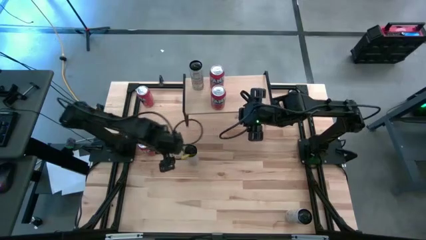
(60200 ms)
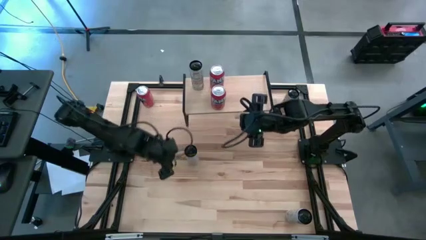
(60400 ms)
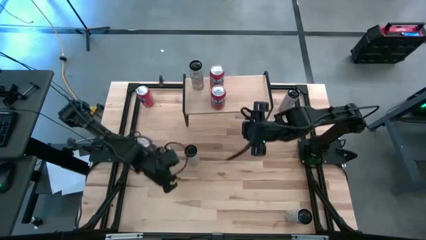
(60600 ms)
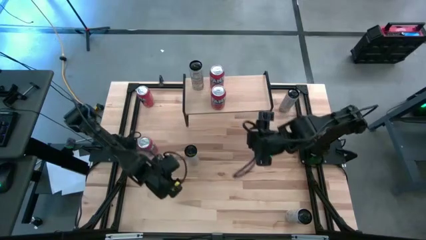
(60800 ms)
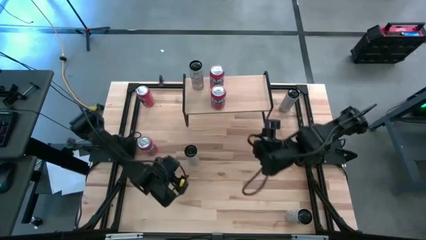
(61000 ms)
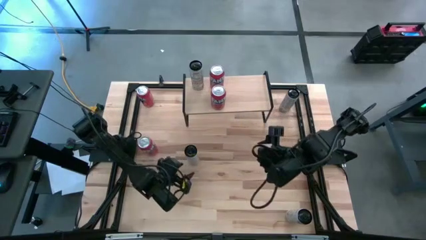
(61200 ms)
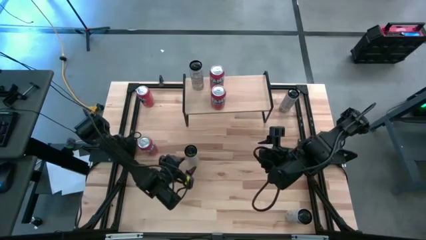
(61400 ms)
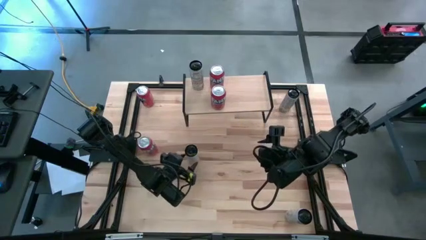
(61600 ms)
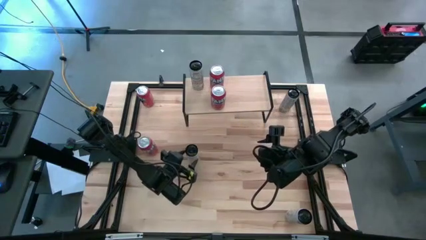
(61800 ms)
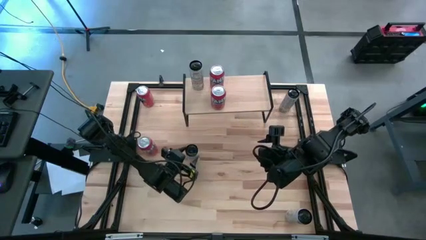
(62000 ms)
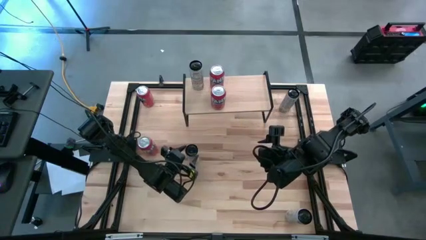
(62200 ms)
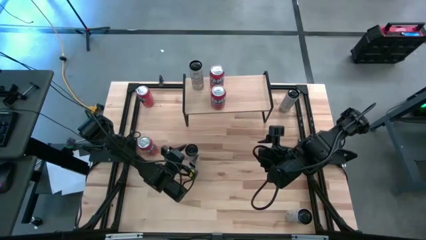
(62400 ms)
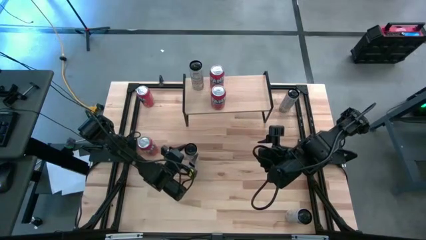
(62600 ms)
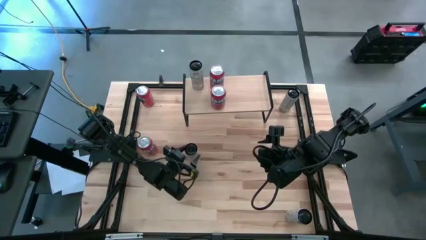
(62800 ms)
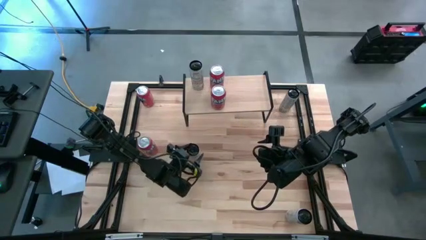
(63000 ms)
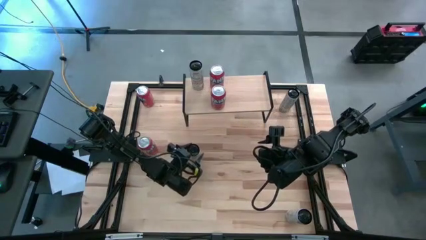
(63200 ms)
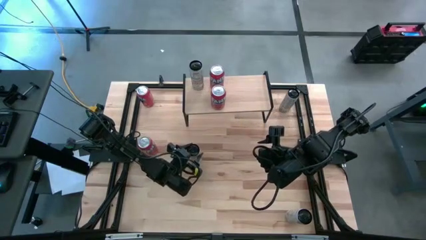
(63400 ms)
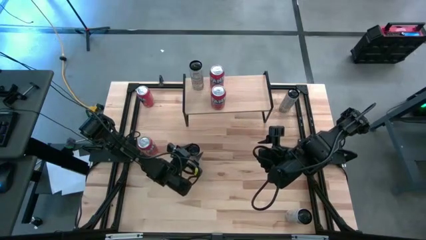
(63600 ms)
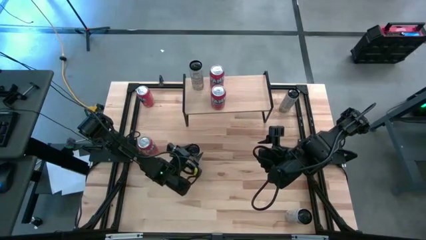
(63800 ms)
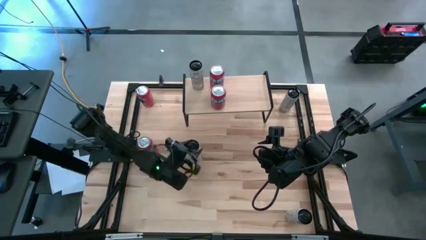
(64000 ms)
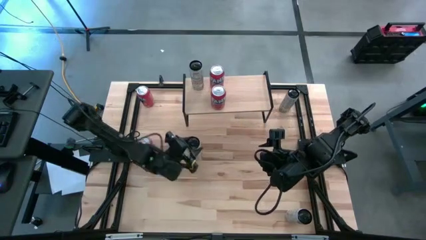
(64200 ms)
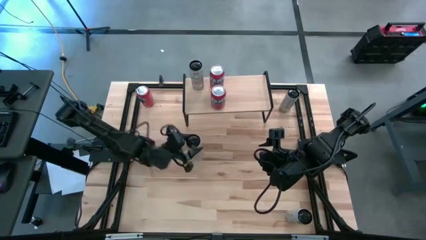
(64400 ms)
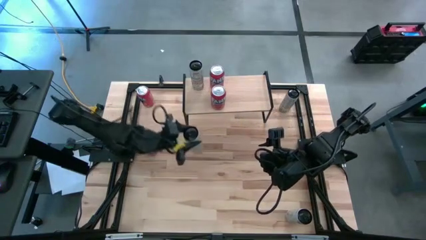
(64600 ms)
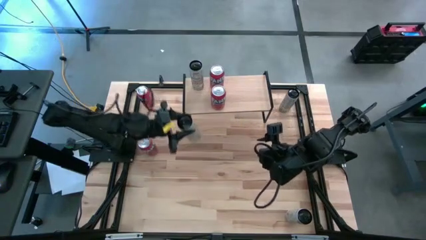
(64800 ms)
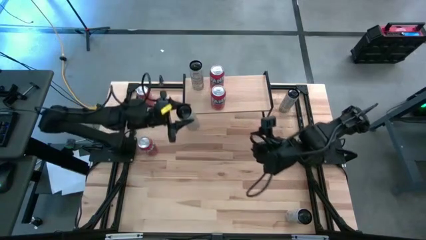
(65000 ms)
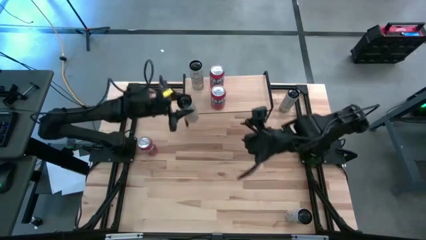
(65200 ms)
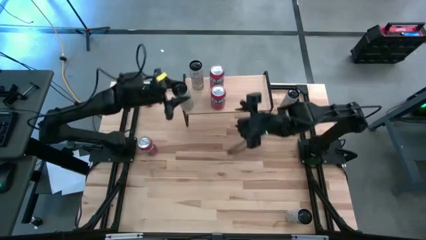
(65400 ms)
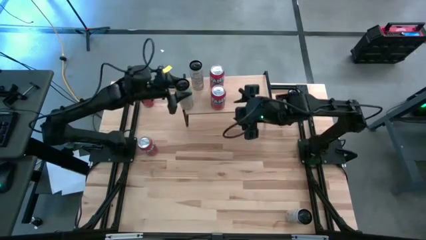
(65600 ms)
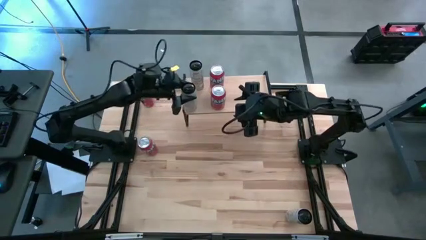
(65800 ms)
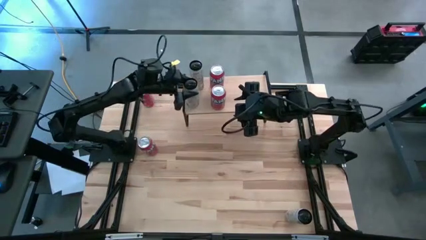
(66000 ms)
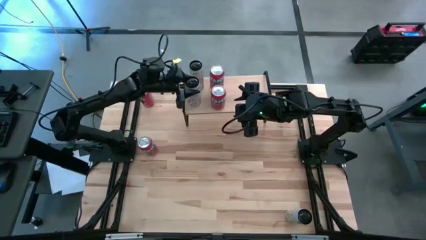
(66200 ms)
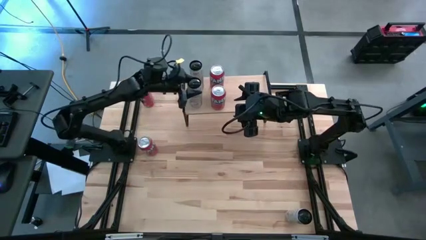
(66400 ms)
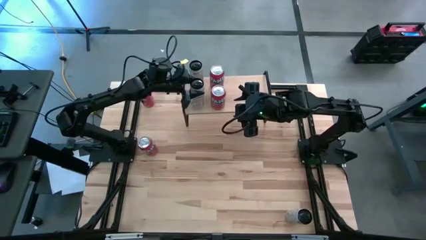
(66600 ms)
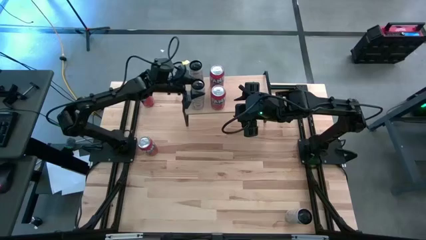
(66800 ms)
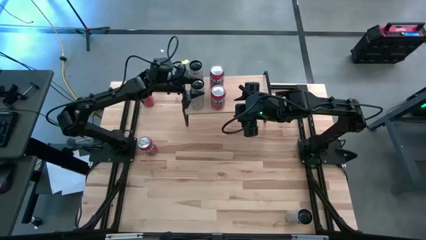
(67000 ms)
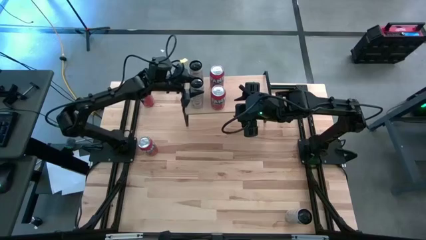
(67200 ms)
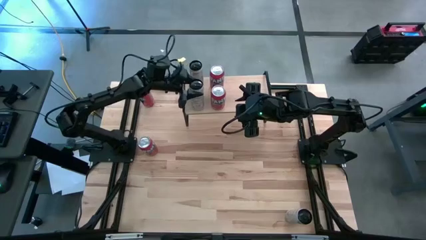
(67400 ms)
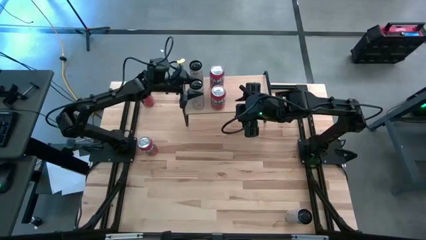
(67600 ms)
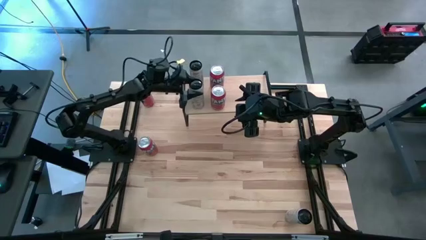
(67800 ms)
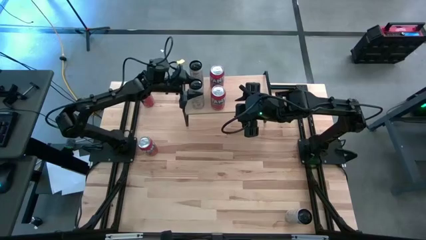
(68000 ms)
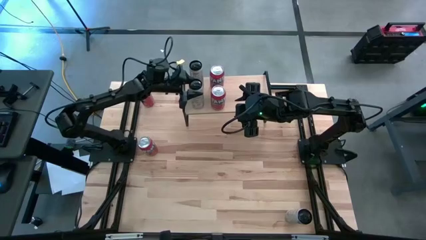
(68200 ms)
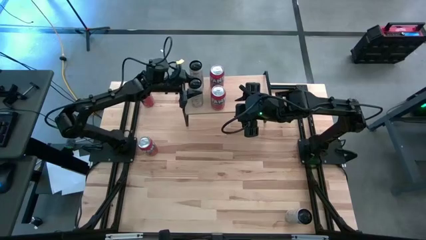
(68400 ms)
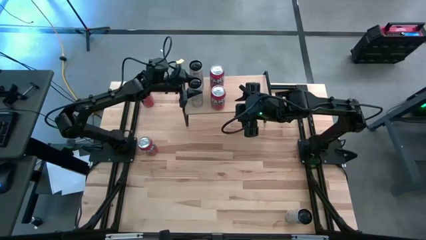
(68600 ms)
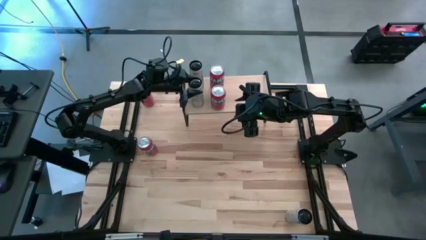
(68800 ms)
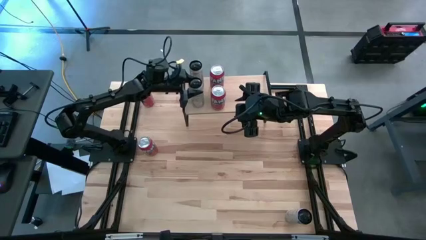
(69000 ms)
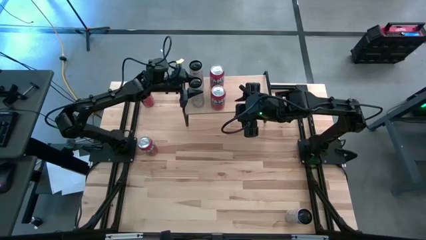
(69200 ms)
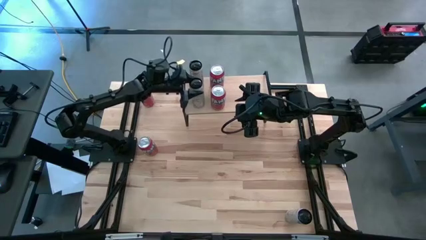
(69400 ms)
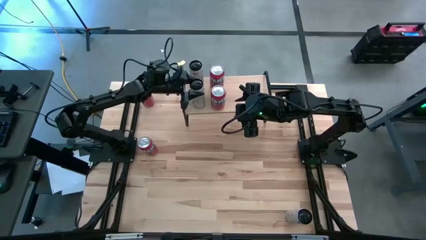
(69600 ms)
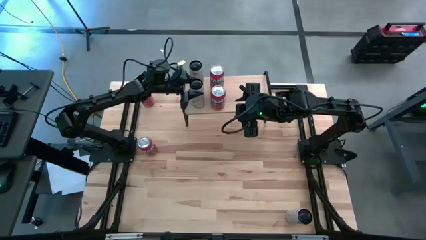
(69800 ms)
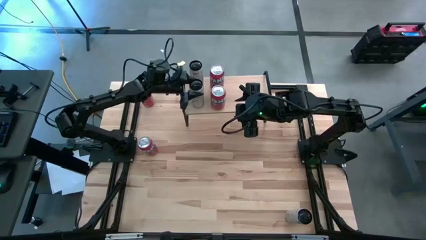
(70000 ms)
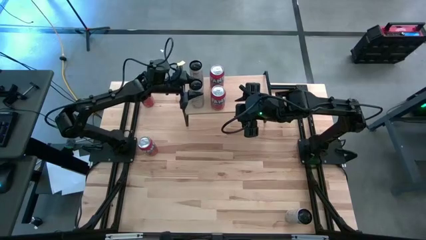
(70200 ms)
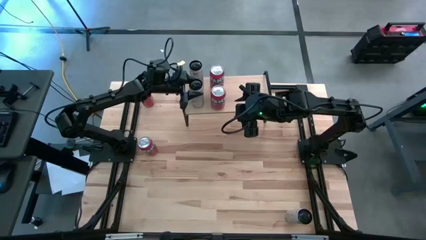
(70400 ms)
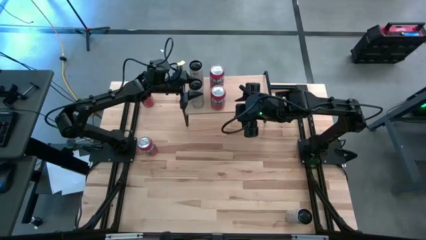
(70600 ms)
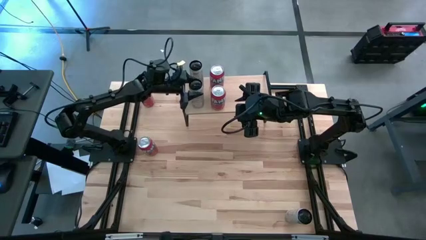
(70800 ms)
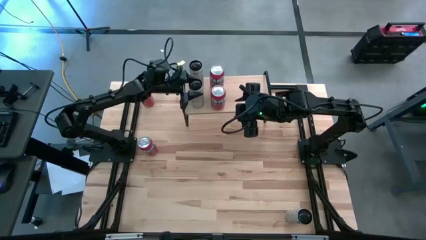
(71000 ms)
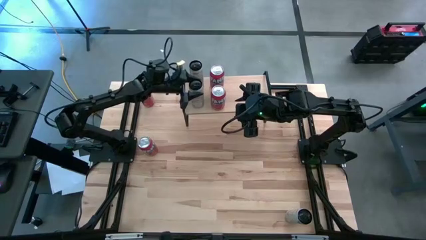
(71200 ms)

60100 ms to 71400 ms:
Task: Place canned beverage on shelf
Put the white yellow soda can on the shelf aligned with the other white yellow soda can

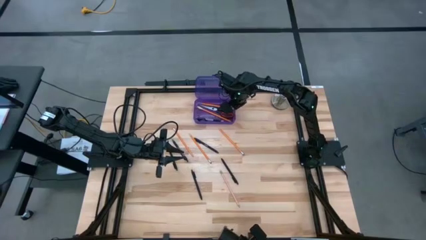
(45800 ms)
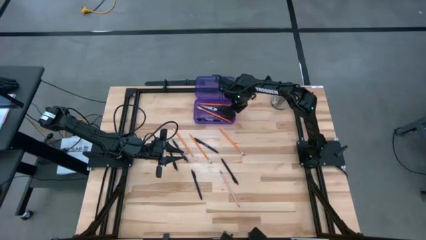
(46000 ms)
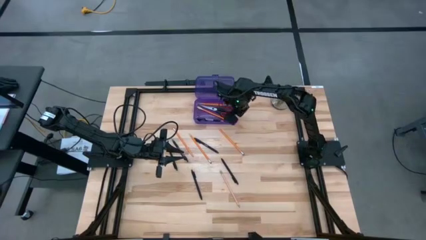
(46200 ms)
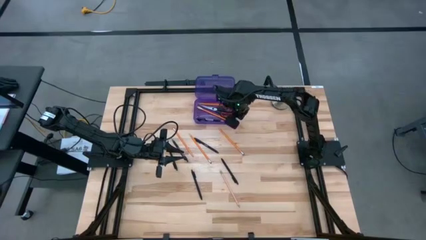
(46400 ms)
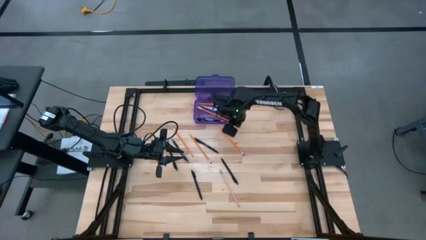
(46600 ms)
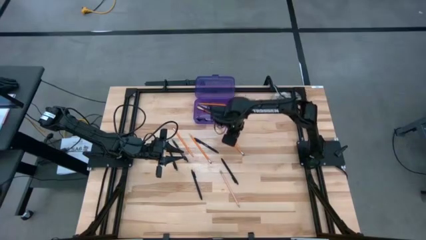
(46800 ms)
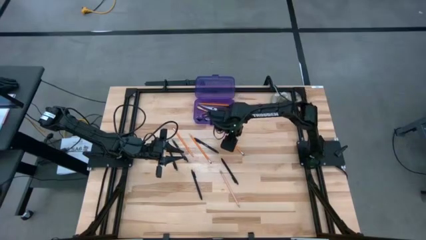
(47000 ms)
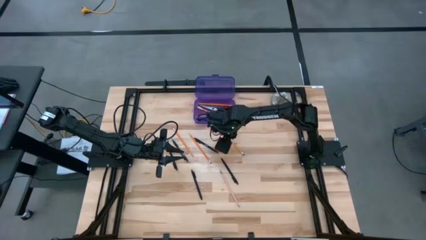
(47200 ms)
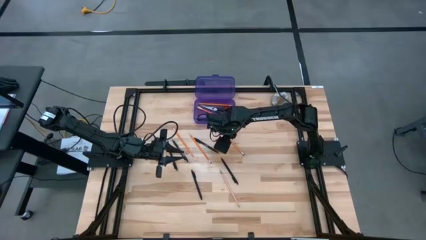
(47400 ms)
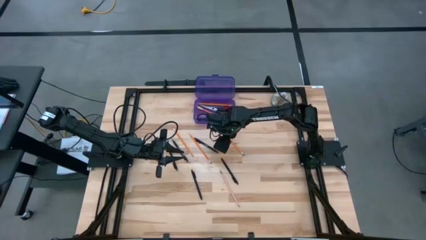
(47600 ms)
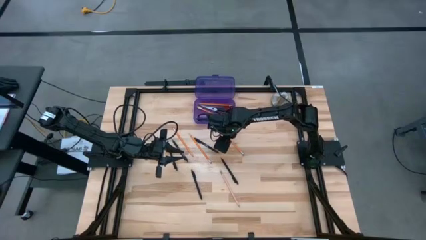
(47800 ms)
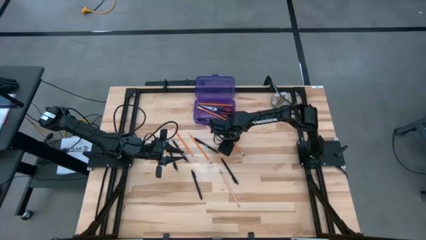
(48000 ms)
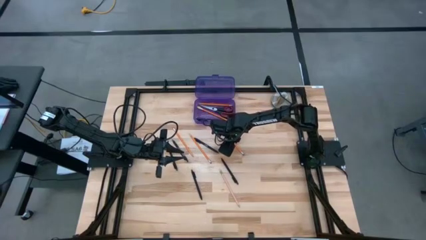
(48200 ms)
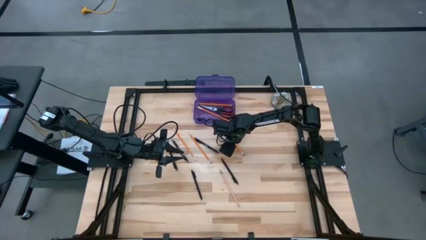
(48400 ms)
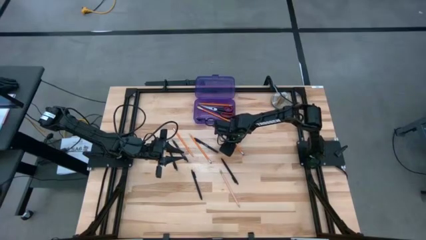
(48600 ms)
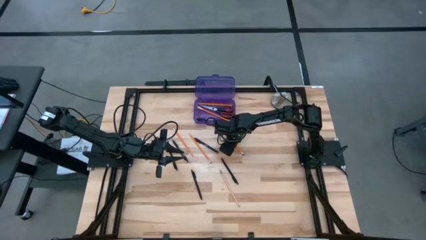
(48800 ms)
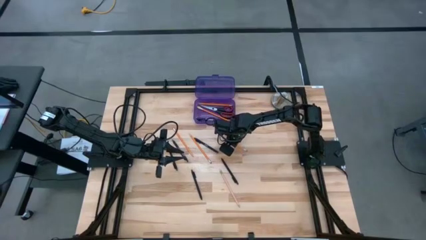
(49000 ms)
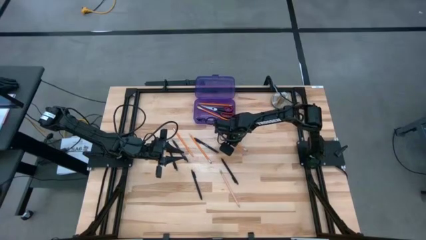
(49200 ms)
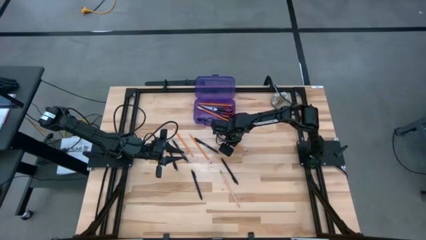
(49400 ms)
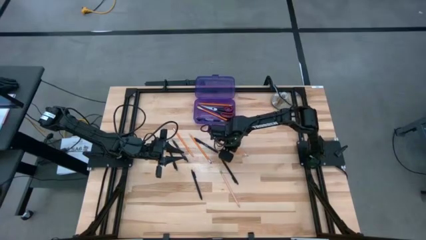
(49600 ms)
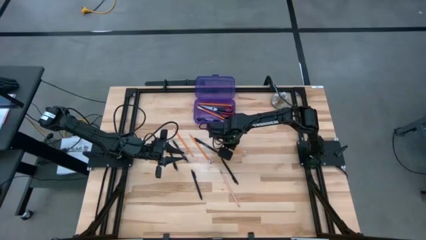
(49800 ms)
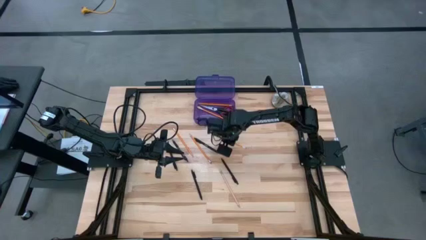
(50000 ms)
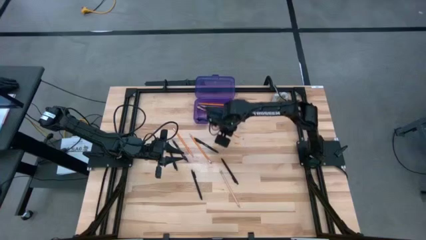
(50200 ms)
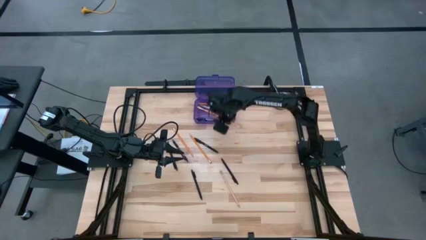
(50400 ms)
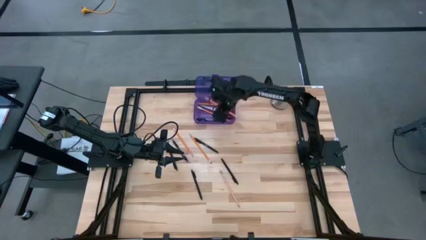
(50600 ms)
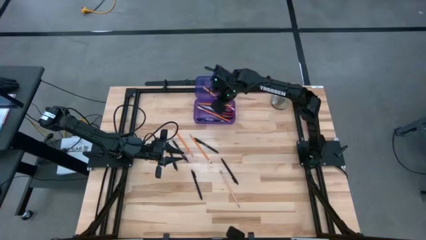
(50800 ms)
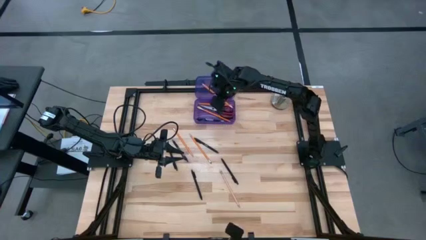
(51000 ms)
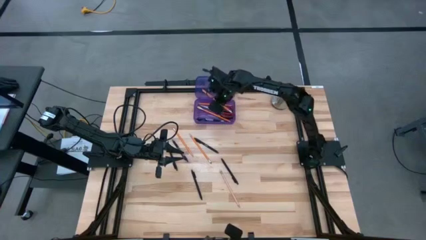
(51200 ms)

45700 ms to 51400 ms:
Task: Pick & place school supplies into a supply box
Put the yellow pencil into the violet supply box
